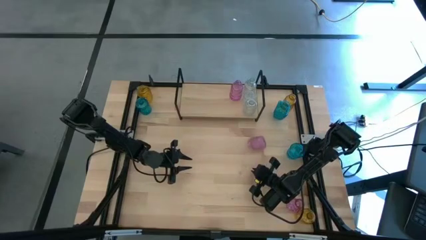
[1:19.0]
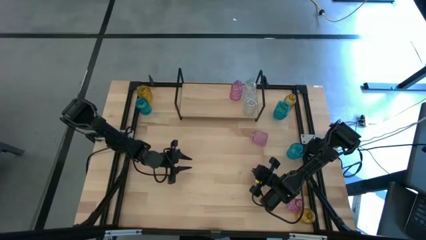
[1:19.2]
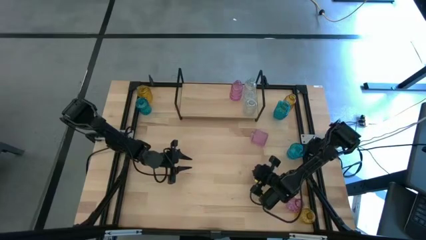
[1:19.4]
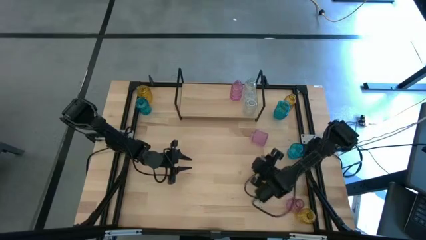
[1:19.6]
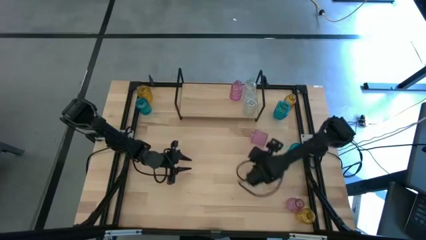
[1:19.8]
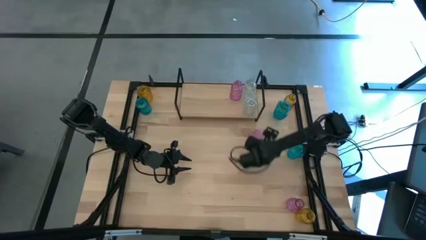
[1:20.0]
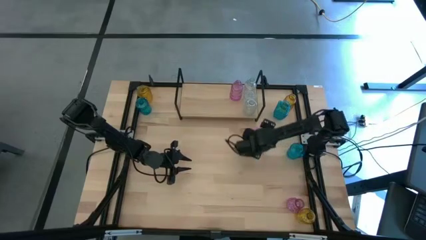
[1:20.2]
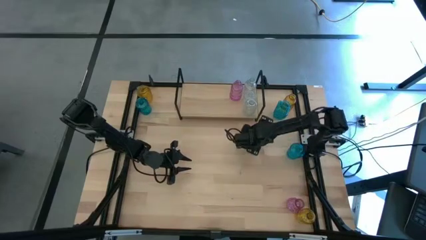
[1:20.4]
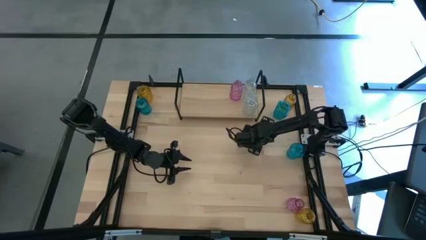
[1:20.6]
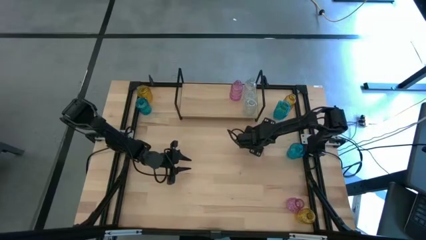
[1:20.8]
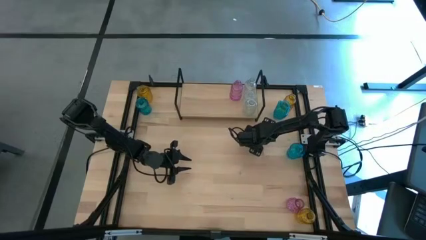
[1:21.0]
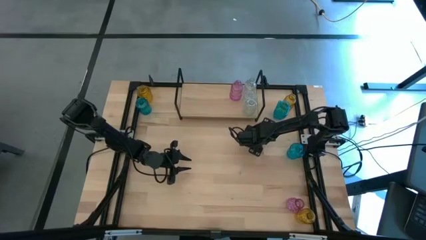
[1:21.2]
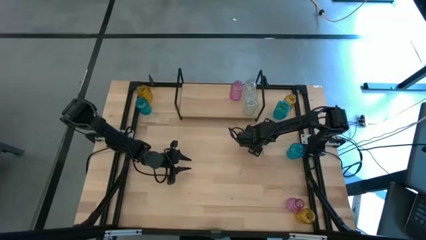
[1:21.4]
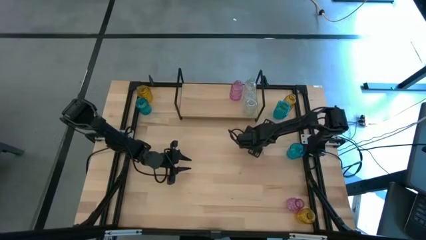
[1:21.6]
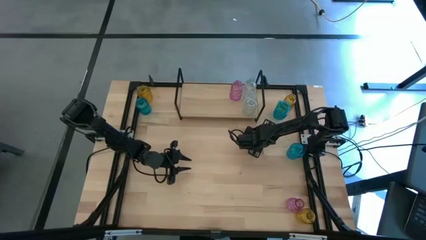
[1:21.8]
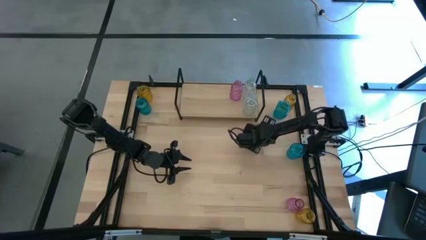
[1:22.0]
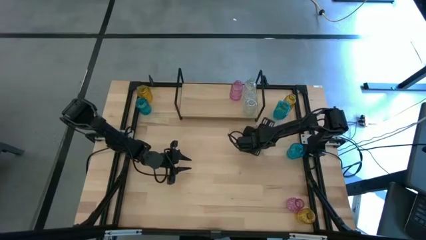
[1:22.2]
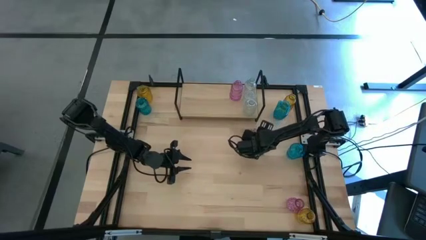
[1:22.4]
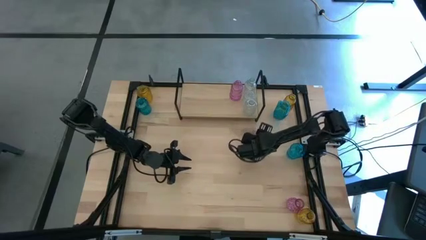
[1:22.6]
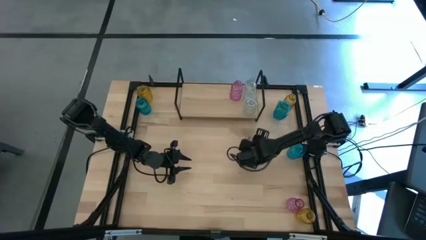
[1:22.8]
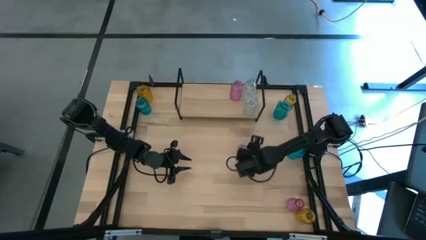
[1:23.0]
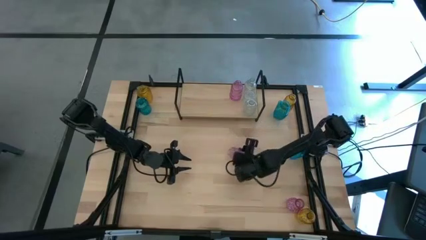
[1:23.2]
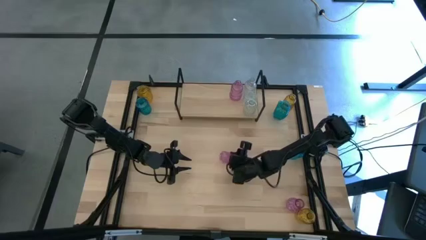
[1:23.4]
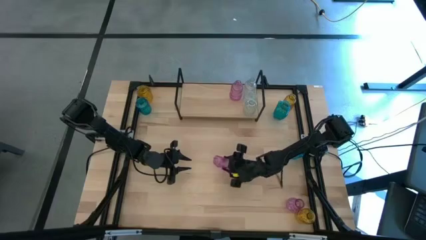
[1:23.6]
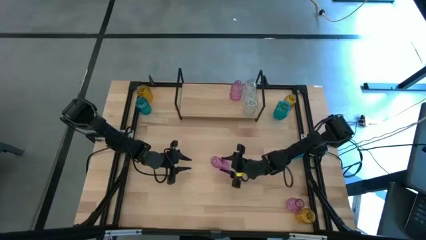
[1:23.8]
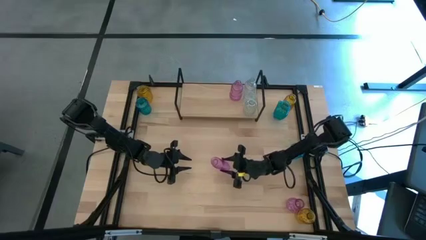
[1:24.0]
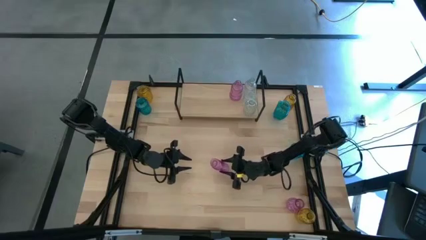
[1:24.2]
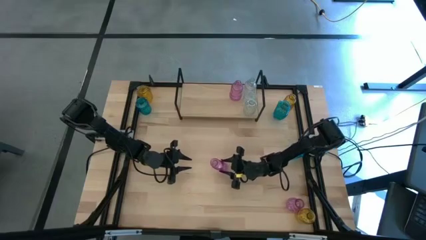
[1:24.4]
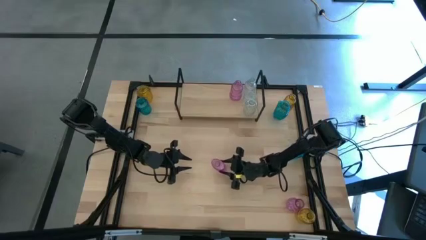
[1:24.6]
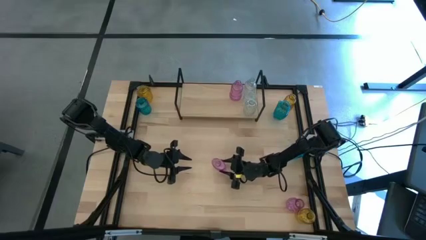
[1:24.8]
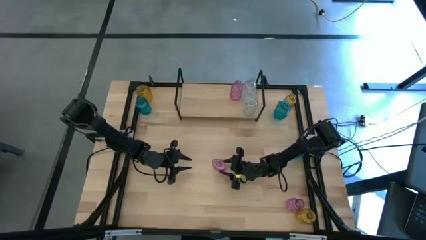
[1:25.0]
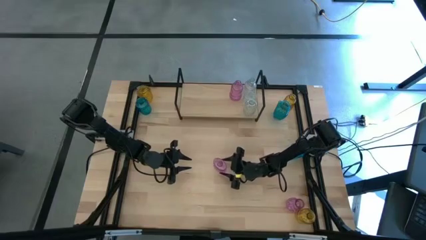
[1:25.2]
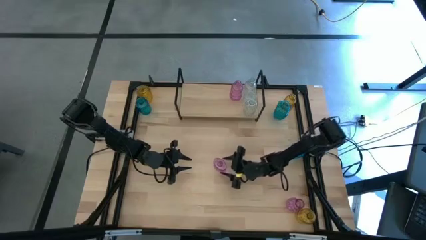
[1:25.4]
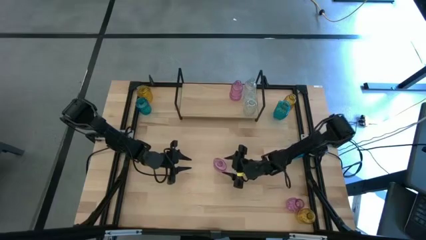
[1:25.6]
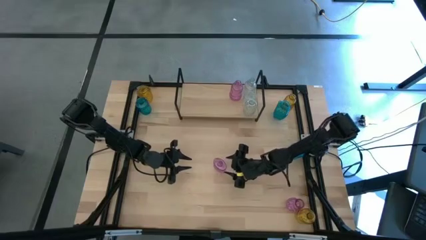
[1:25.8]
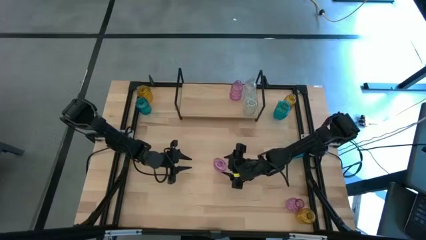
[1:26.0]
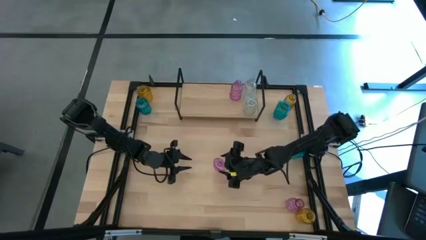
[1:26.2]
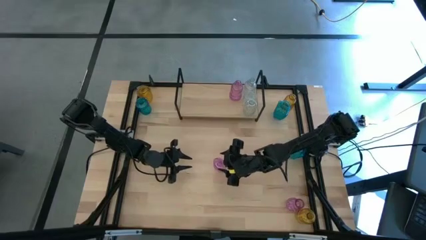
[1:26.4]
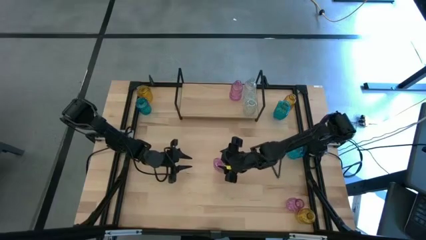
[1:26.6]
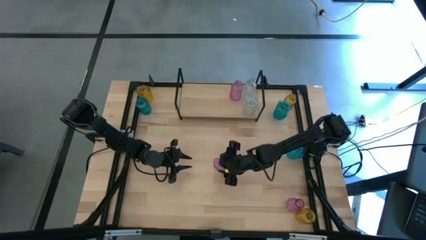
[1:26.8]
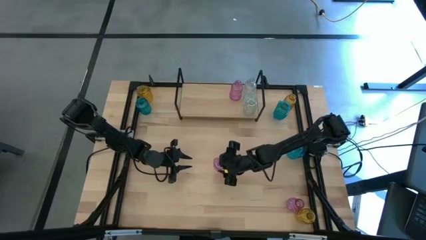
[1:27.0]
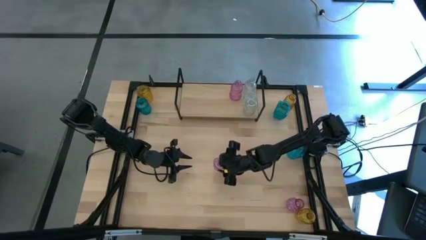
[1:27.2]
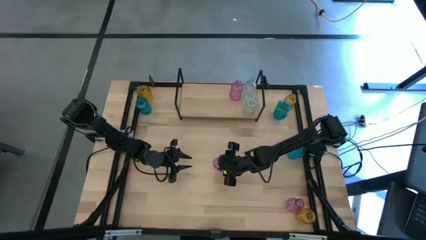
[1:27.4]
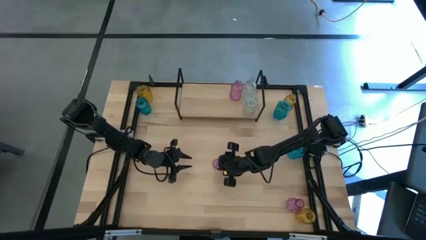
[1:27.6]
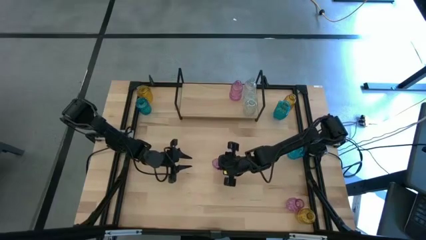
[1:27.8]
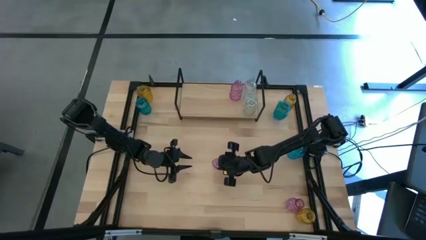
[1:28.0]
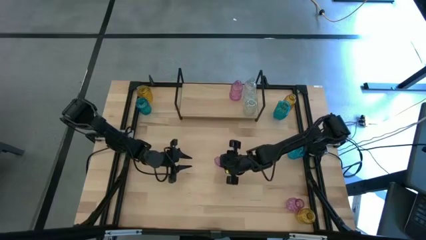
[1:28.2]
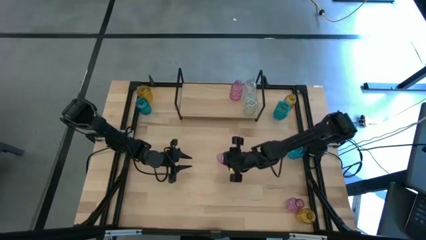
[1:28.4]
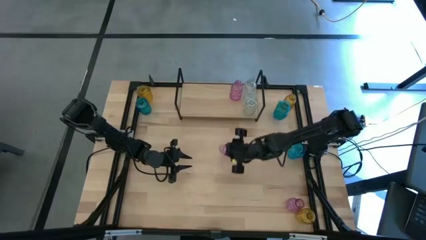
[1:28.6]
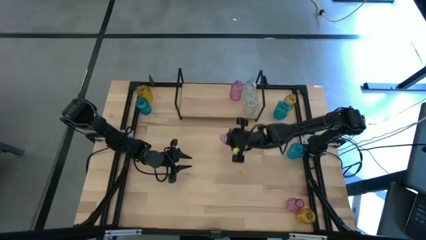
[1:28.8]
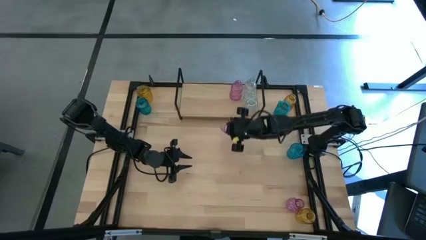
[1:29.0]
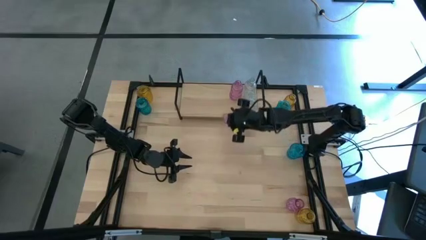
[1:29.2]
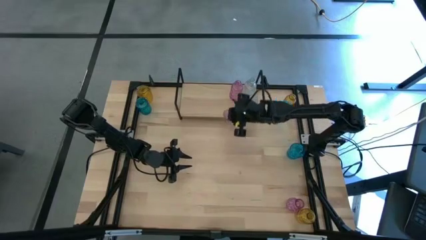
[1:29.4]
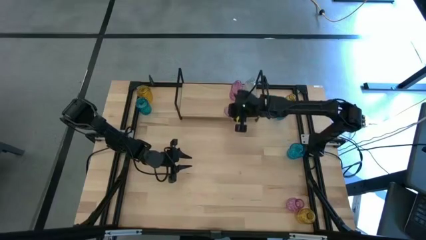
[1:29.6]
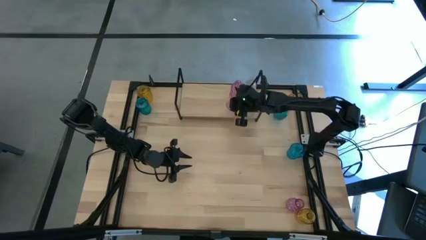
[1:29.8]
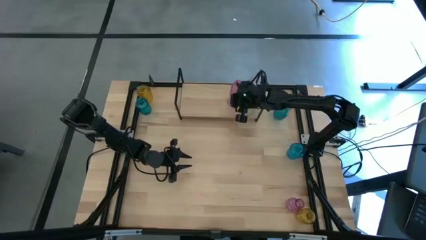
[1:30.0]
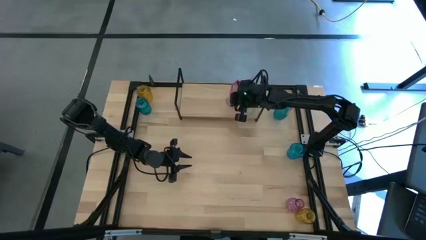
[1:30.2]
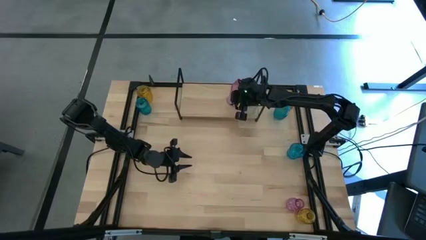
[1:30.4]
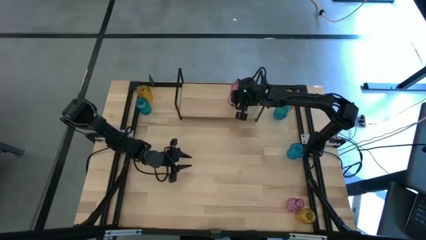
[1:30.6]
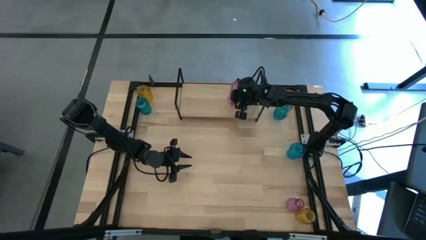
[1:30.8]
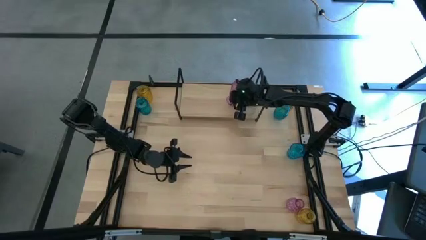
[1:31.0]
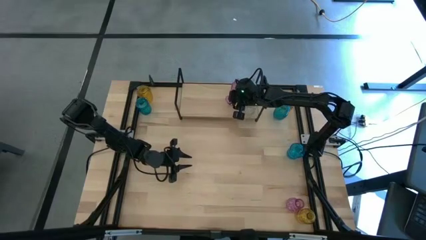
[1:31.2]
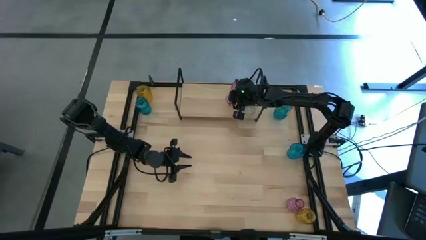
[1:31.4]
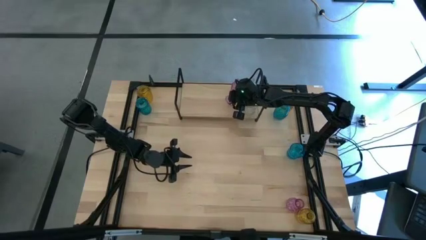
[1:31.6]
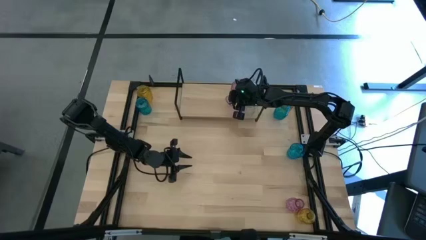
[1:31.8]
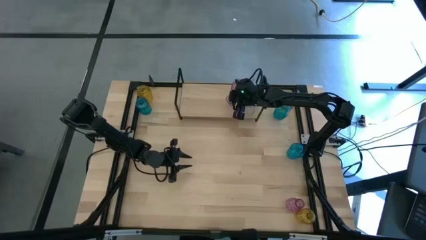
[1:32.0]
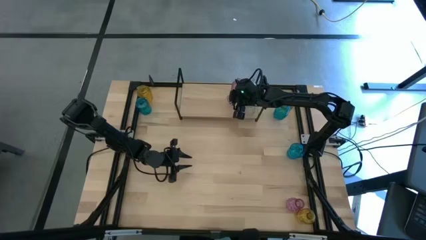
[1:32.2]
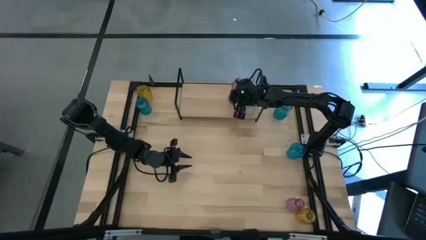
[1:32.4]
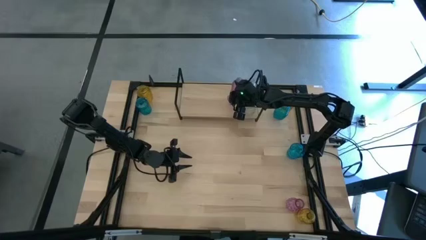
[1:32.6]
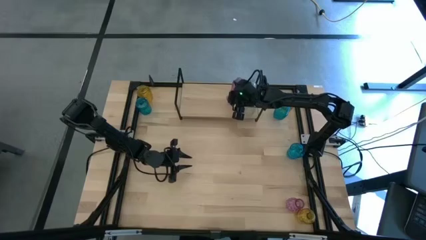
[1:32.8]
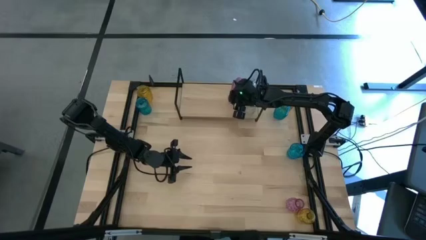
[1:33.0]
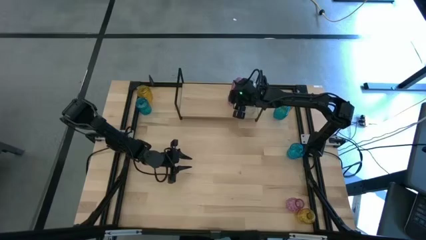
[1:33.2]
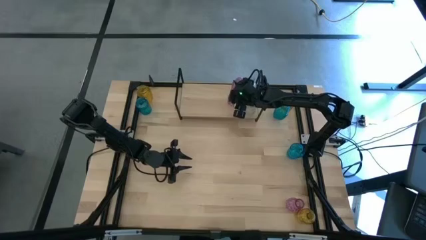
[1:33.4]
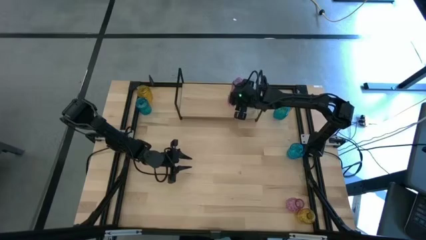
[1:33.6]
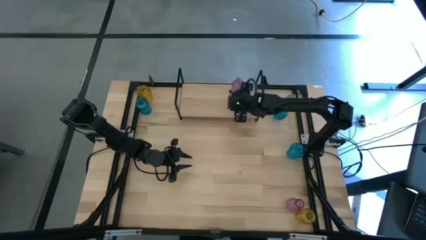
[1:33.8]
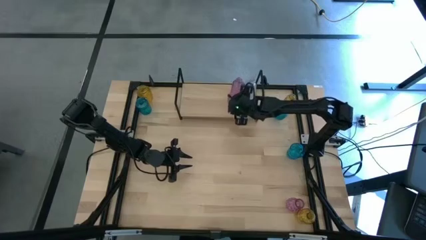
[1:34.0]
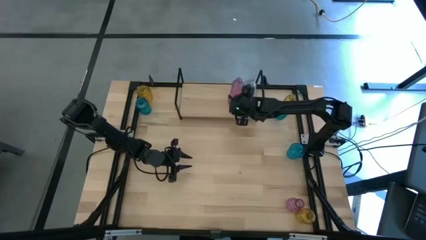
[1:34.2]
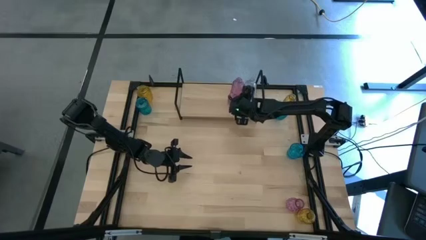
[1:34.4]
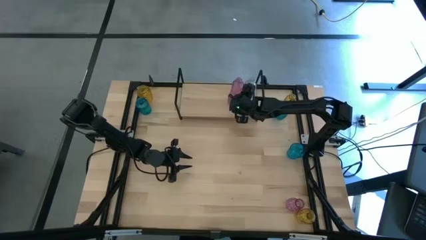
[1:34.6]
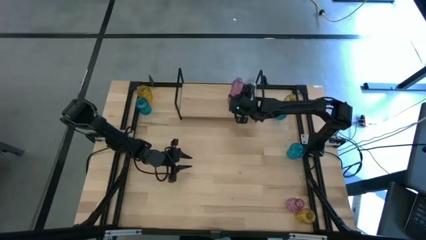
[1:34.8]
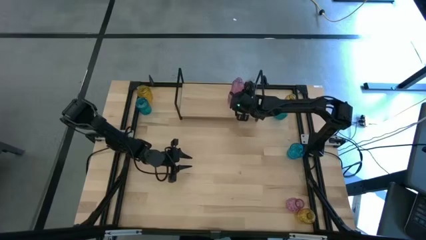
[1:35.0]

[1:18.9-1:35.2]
Task: sort vases onto shelf
Put the top pink vase on the shelf aligned with the other pink vase
